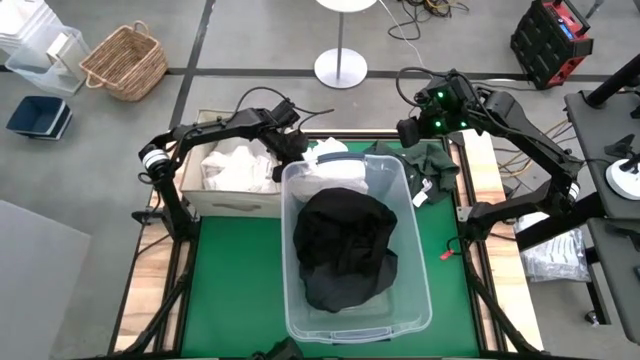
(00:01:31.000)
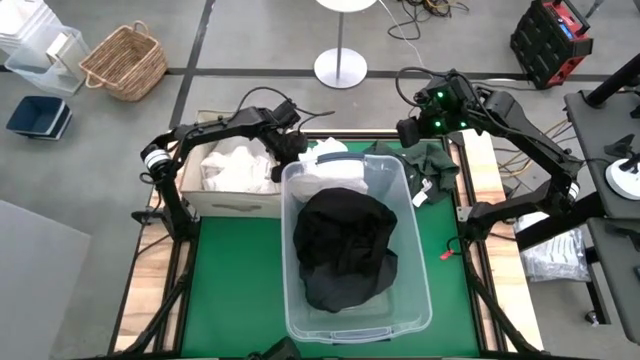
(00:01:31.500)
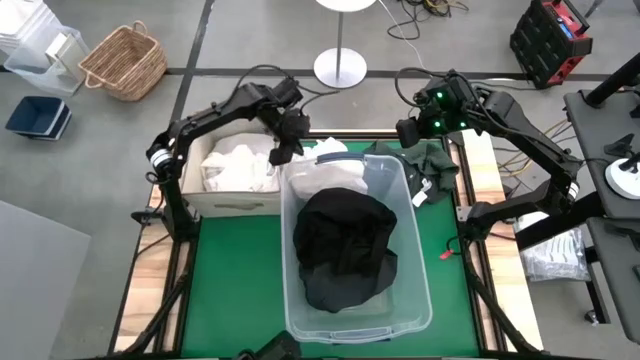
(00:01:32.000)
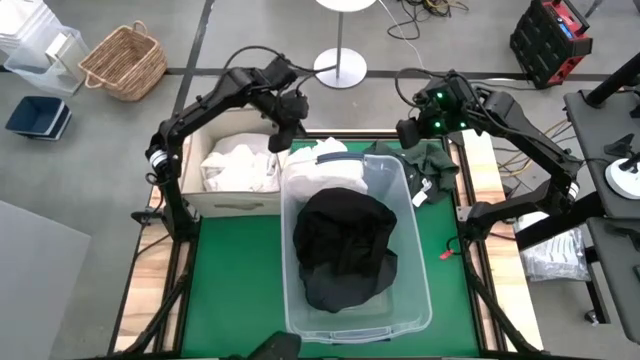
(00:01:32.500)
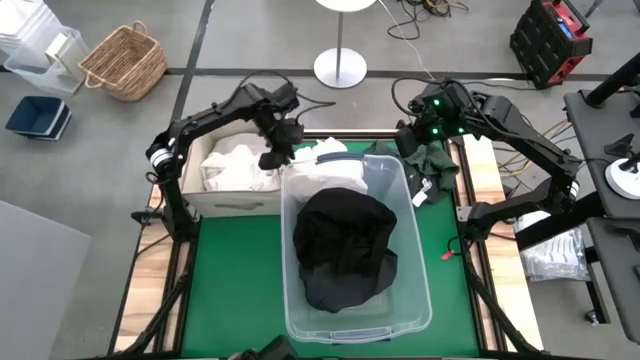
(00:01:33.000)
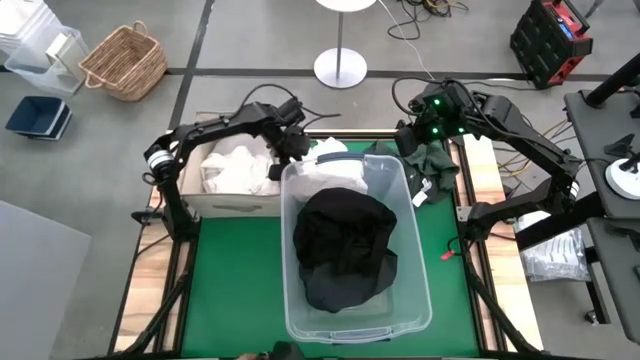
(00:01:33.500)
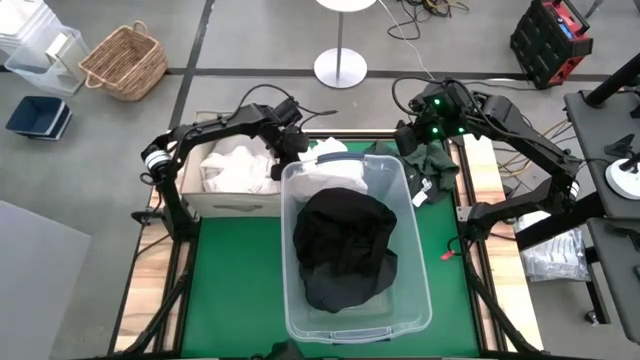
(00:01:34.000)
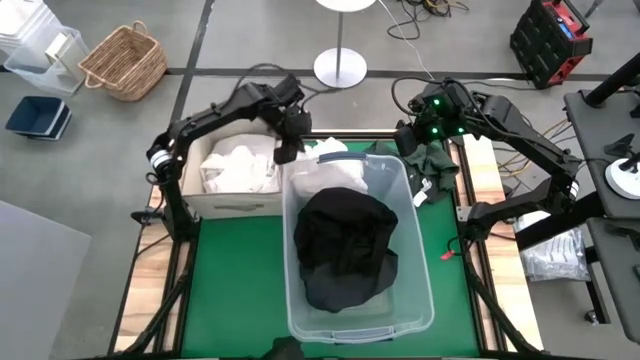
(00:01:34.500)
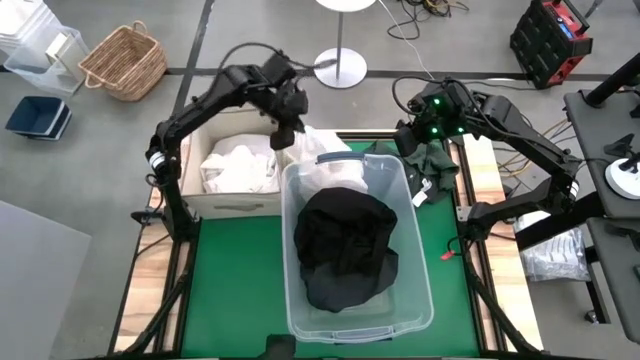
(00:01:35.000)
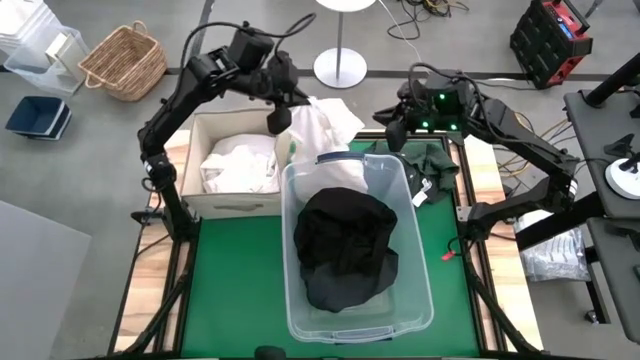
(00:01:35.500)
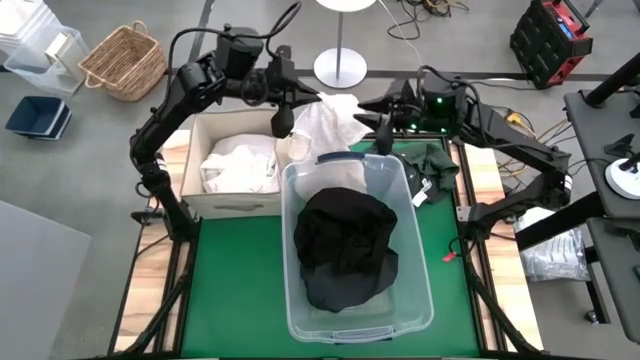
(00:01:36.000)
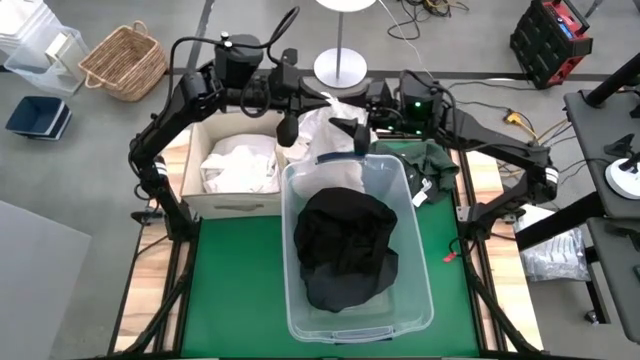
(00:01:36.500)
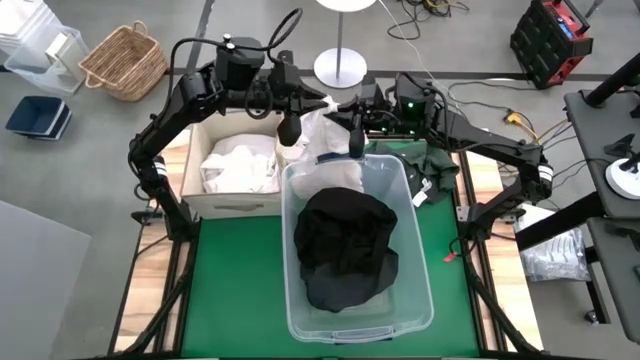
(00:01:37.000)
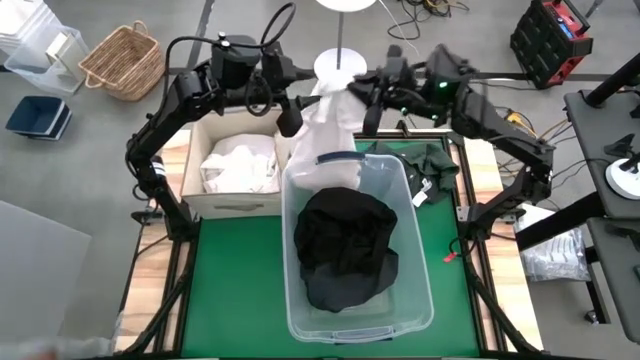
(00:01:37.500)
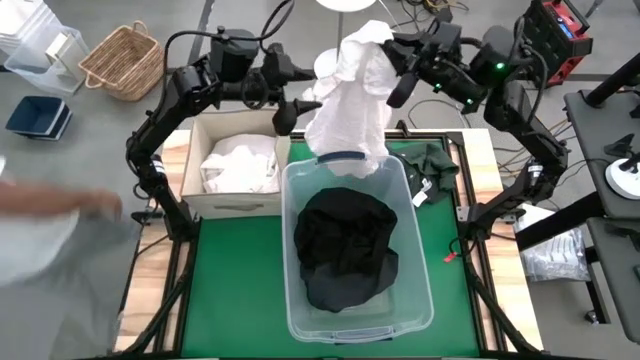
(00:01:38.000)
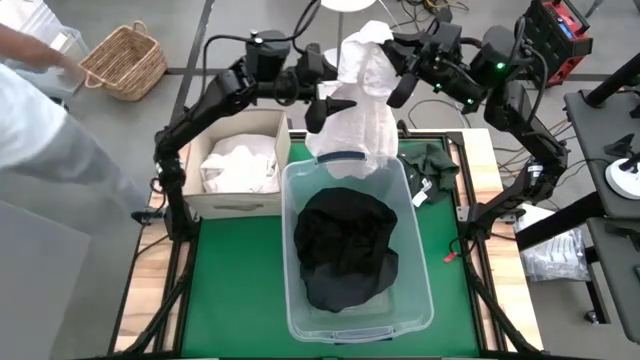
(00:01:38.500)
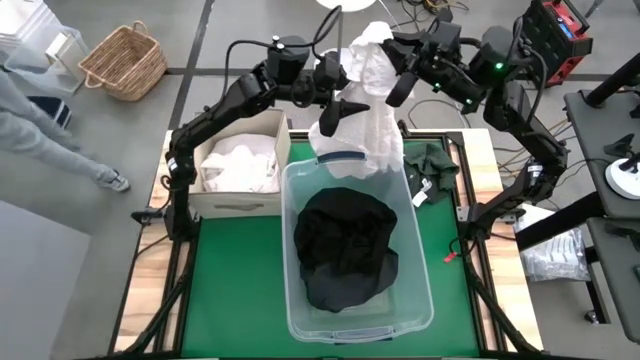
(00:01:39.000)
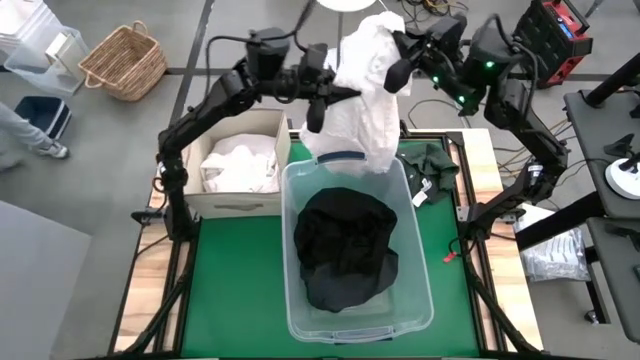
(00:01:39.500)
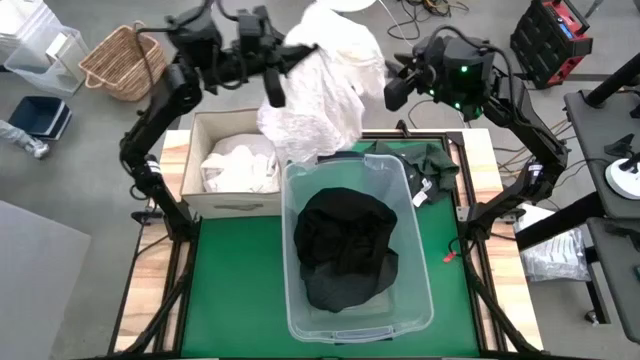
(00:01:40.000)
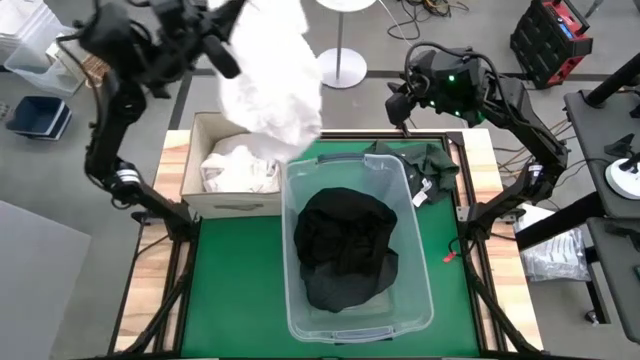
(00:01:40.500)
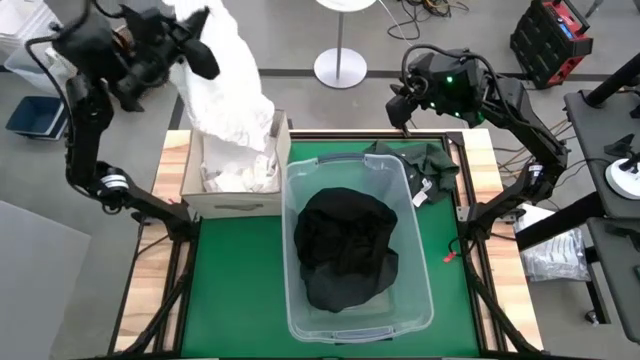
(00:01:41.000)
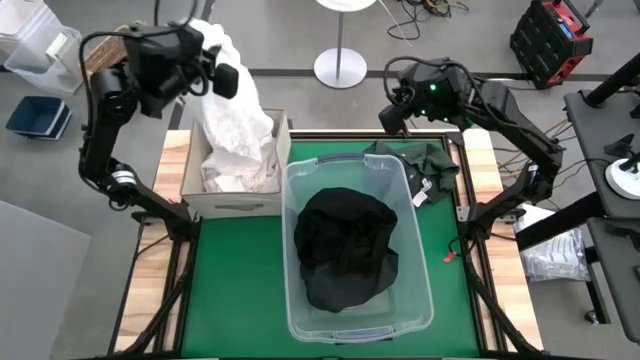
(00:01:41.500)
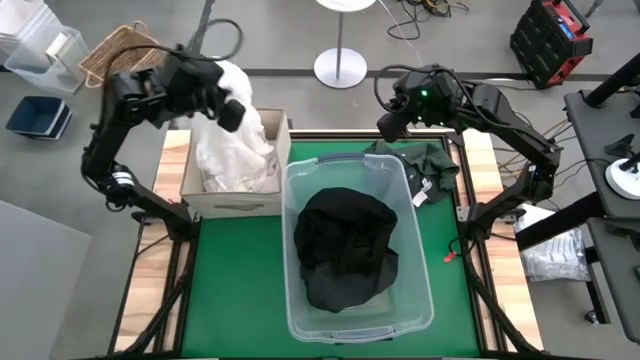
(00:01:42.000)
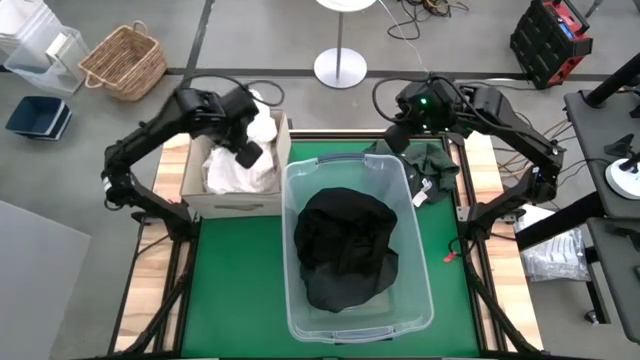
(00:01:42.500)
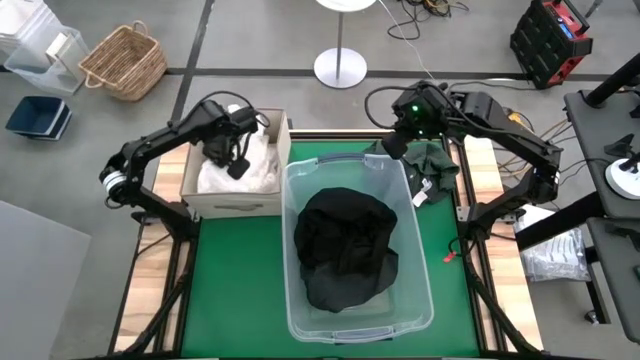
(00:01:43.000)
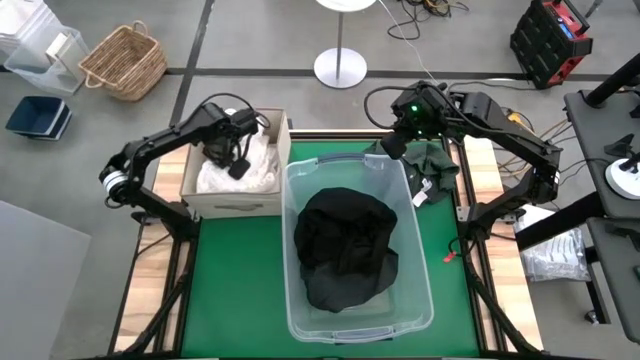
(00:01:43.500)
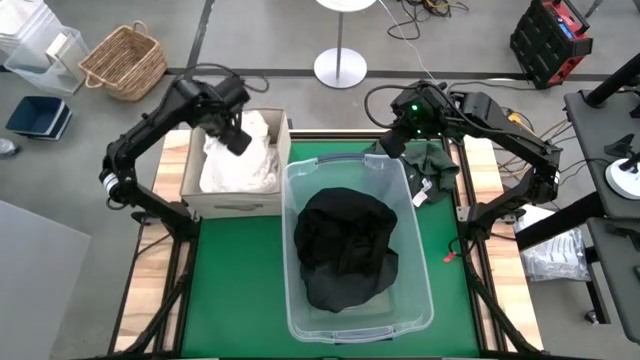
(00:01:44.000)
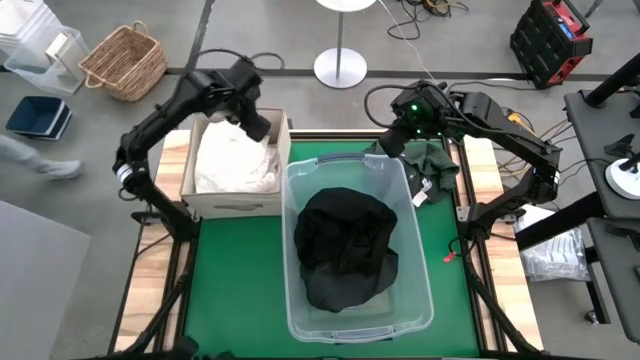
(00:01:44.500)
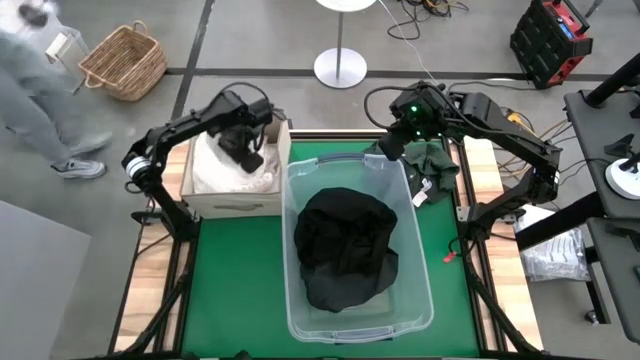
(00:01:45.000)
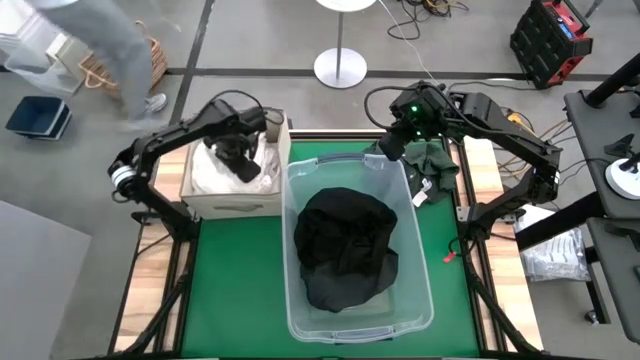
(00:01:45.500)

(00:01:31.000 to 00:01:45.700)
Task: Sort clothes
Put the white dress into the white laundry organizer

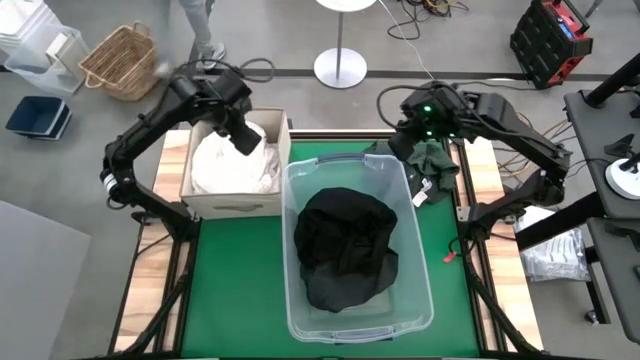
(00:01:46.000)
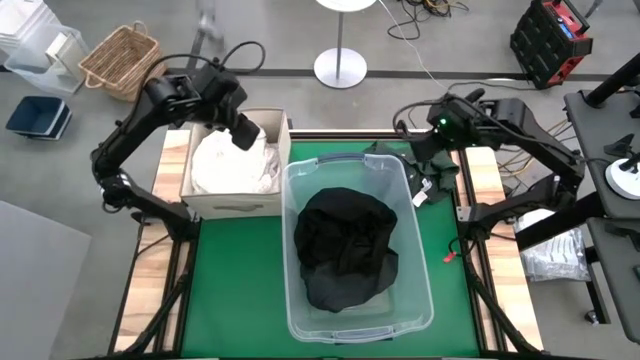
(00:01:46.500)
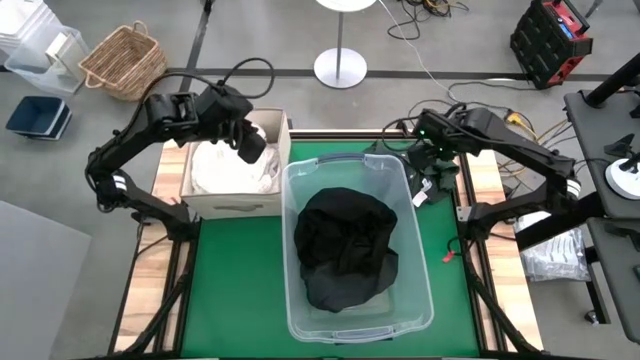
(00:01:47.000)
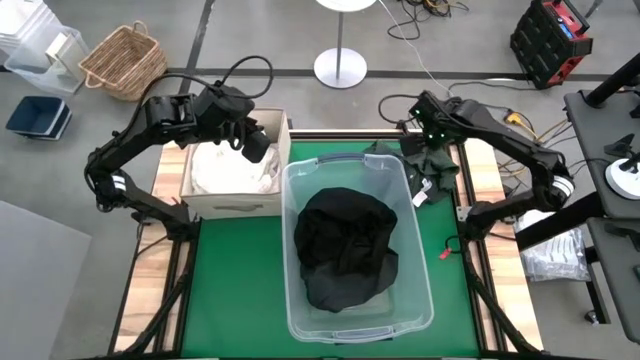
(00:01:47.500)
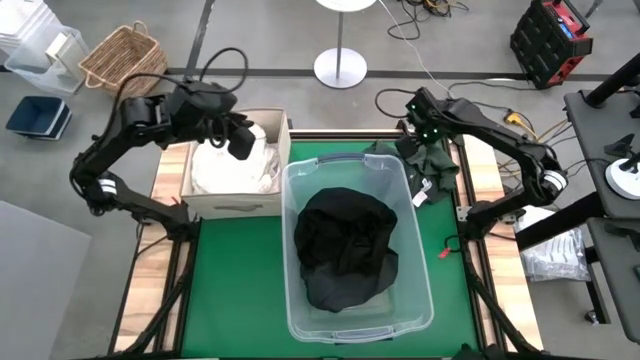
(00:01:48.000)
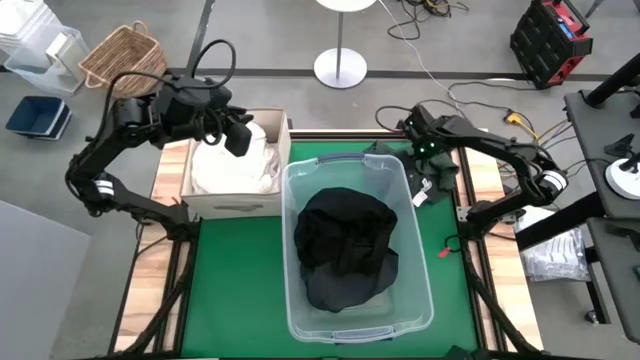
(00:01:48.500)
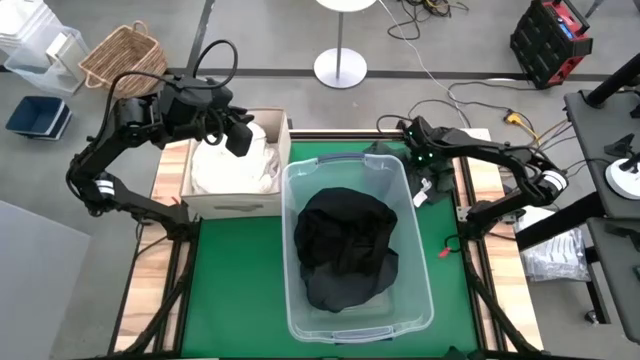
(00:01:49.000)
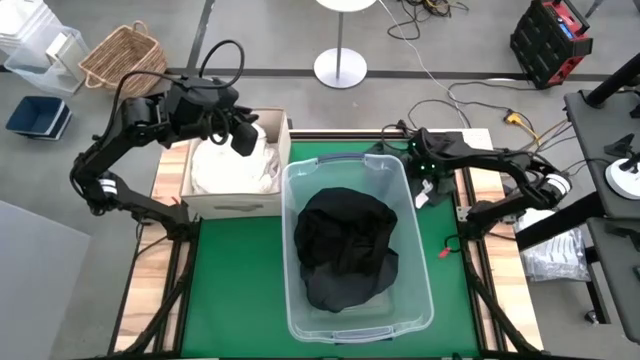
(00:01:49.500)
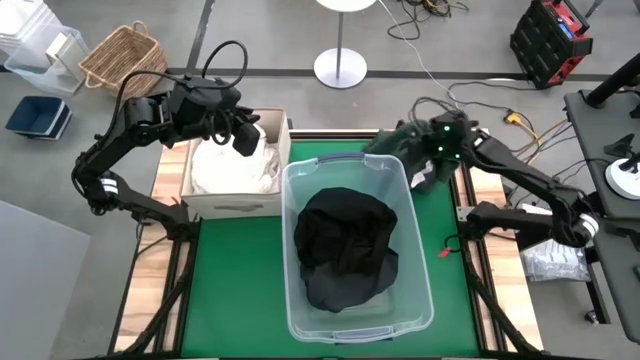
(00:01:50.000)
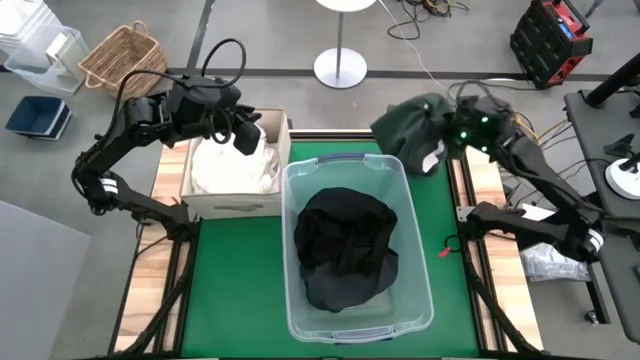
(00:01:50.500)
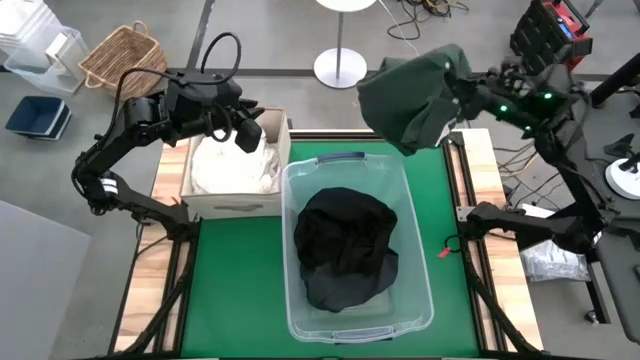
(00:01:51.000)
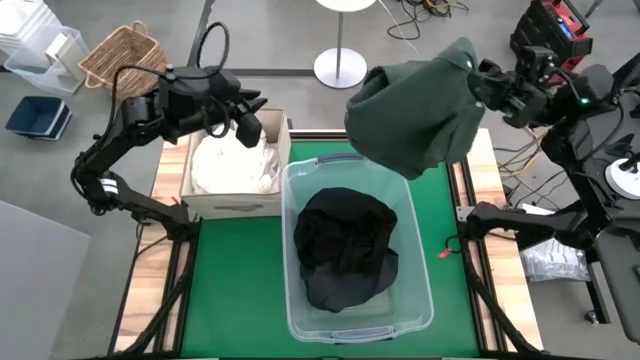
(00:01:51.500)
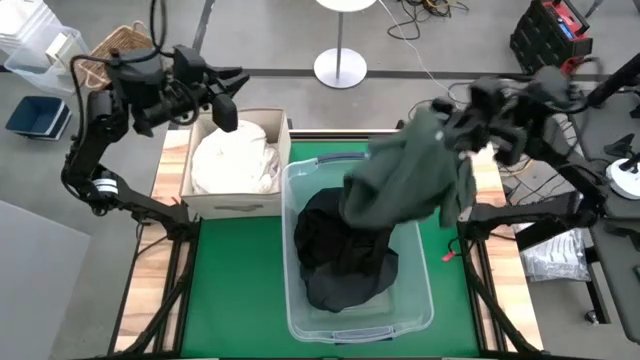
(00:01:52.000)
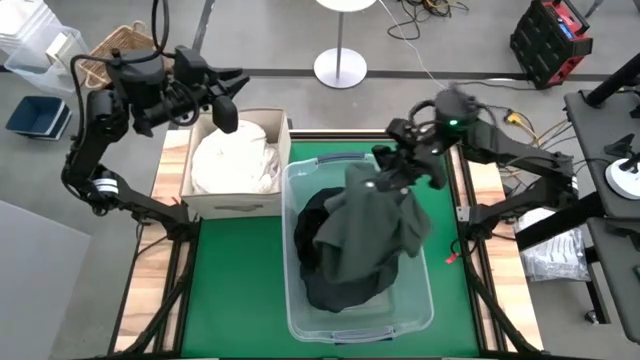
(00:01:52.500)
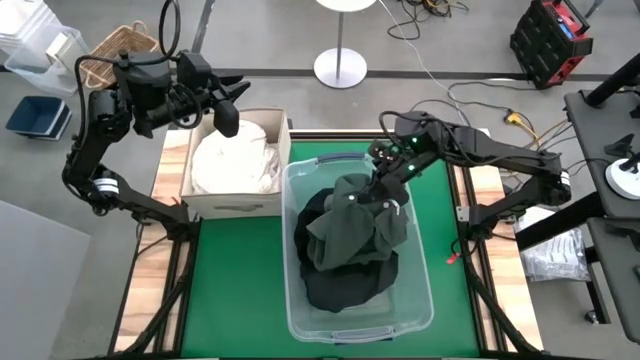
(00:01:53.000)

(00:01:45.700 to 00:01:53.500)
Put the green shirt into the transparent bin
